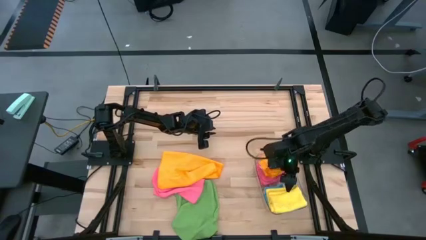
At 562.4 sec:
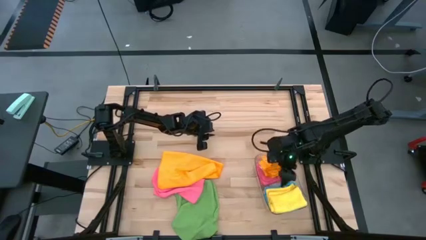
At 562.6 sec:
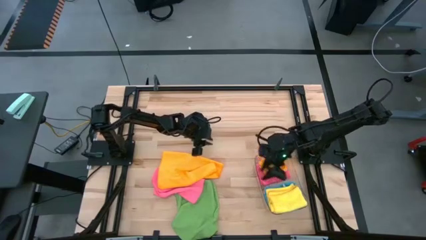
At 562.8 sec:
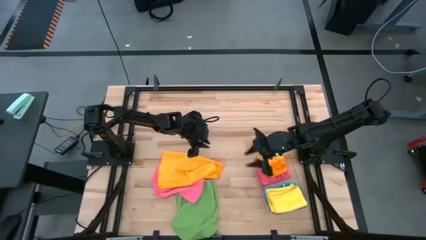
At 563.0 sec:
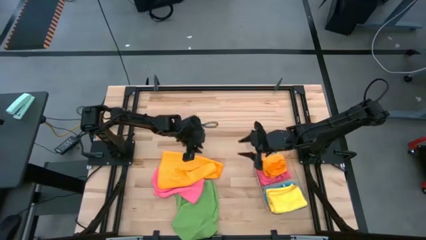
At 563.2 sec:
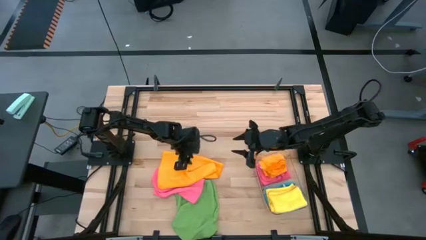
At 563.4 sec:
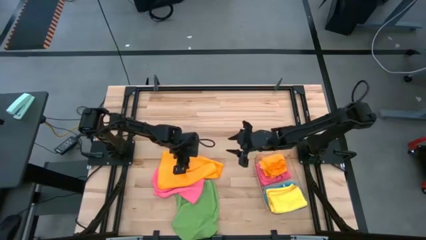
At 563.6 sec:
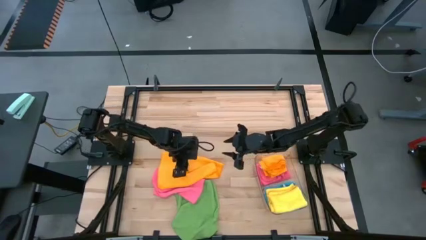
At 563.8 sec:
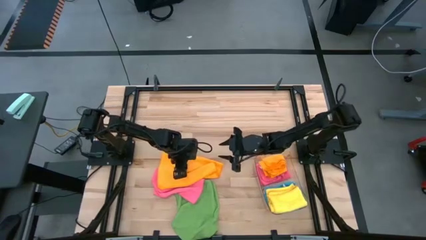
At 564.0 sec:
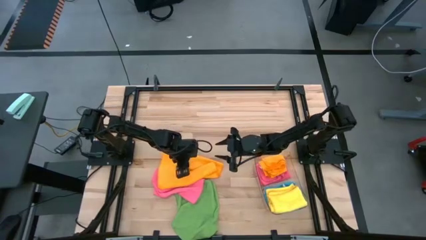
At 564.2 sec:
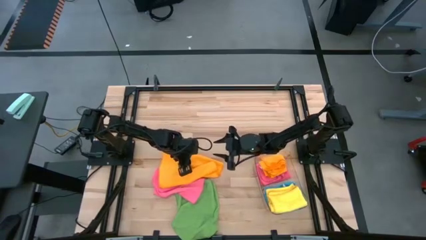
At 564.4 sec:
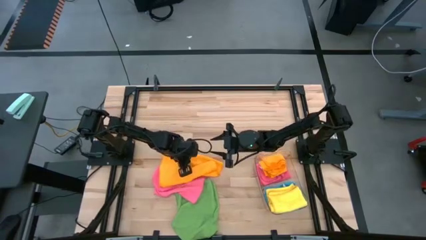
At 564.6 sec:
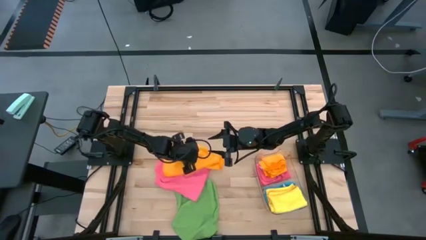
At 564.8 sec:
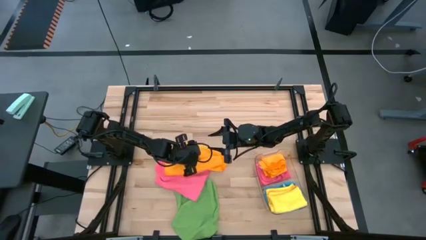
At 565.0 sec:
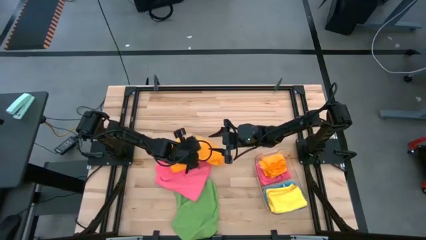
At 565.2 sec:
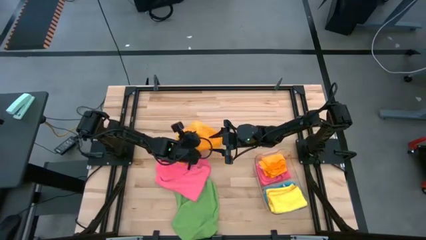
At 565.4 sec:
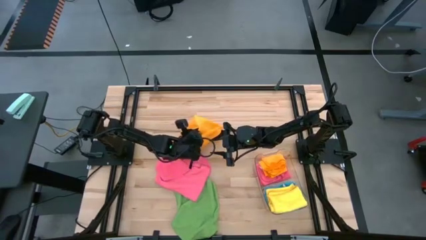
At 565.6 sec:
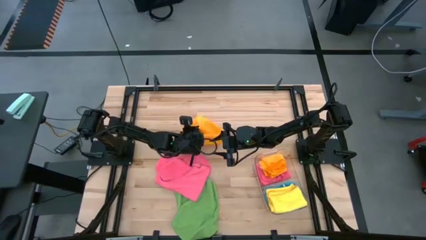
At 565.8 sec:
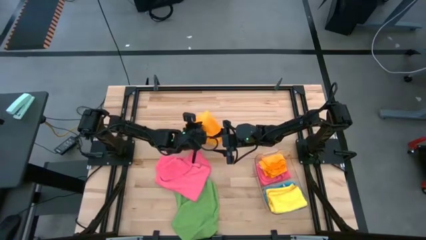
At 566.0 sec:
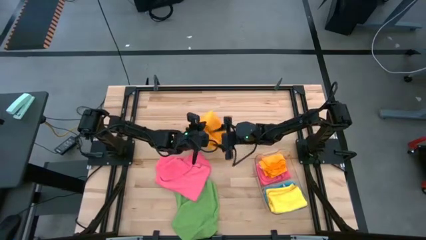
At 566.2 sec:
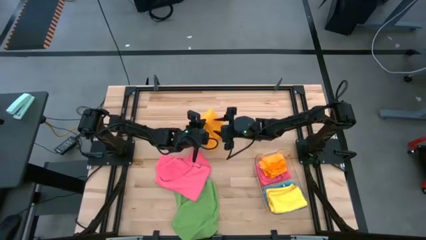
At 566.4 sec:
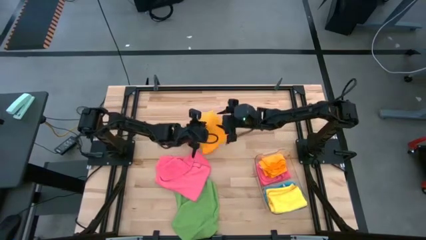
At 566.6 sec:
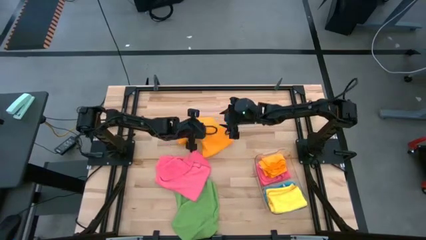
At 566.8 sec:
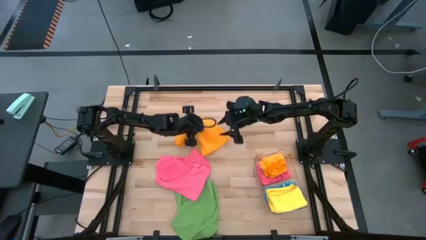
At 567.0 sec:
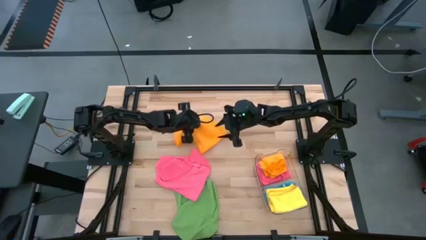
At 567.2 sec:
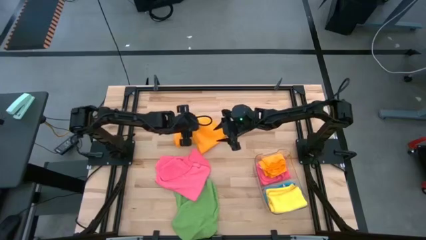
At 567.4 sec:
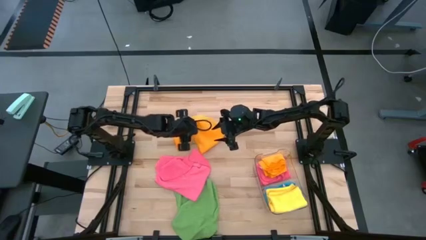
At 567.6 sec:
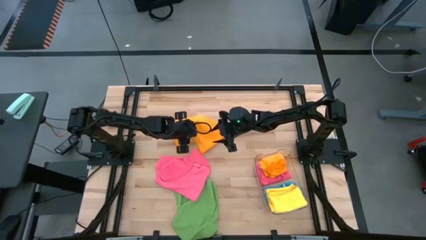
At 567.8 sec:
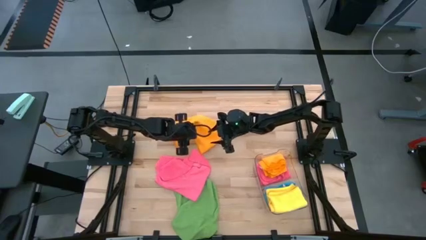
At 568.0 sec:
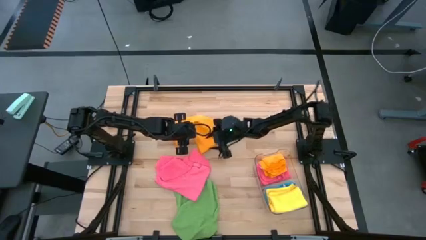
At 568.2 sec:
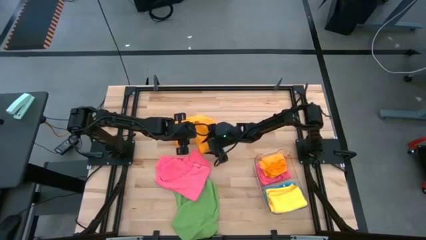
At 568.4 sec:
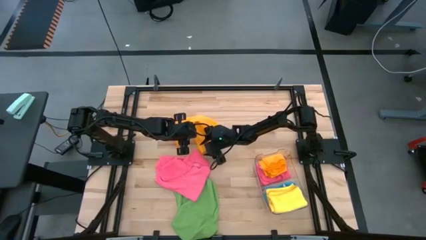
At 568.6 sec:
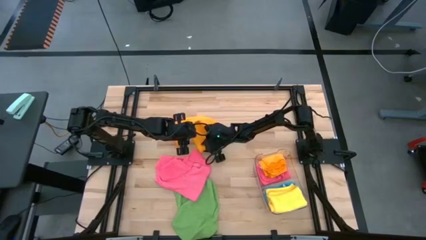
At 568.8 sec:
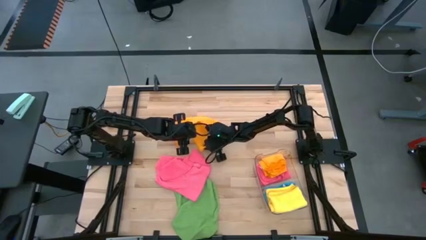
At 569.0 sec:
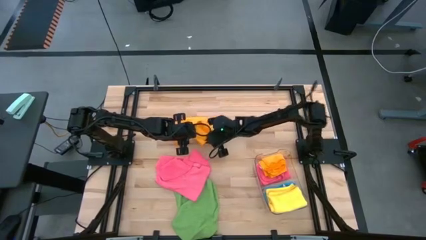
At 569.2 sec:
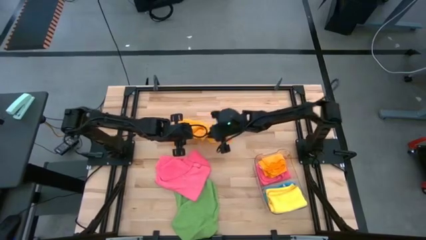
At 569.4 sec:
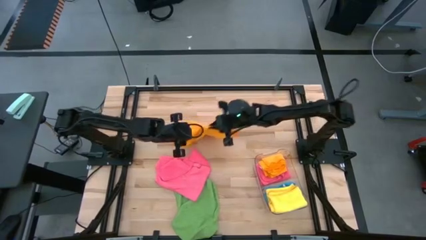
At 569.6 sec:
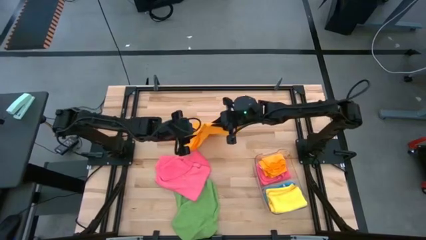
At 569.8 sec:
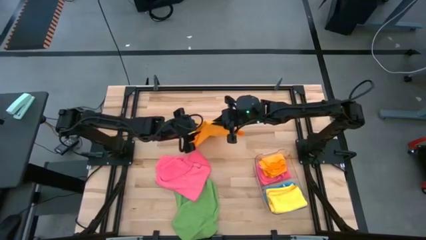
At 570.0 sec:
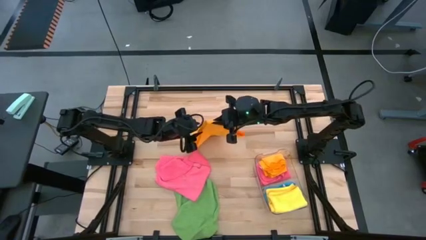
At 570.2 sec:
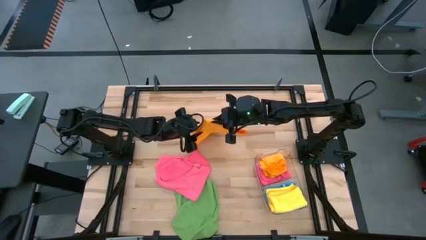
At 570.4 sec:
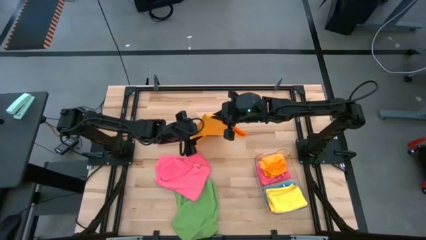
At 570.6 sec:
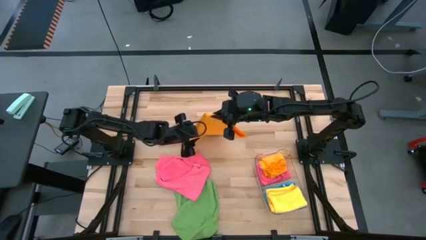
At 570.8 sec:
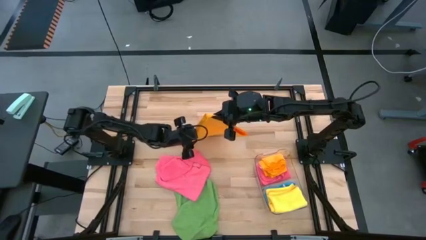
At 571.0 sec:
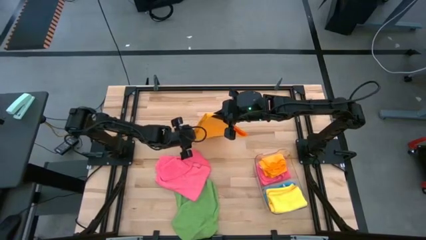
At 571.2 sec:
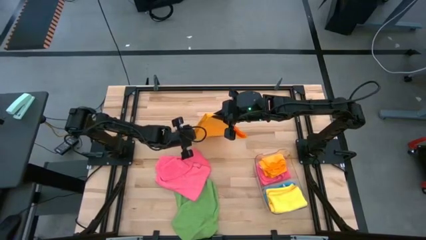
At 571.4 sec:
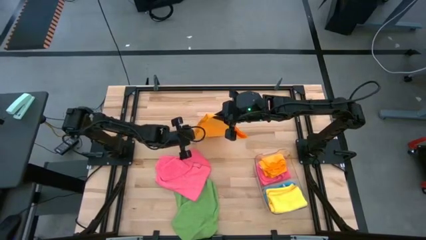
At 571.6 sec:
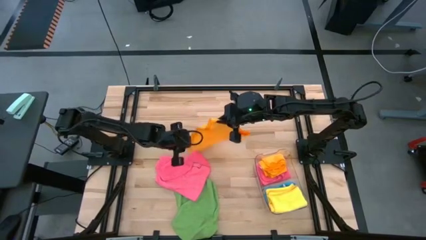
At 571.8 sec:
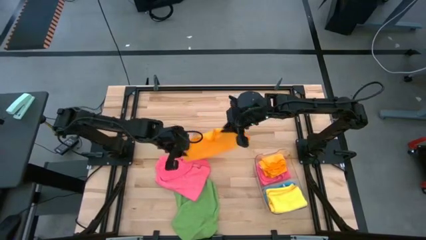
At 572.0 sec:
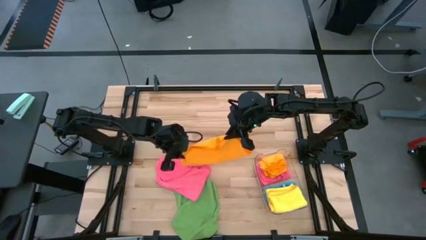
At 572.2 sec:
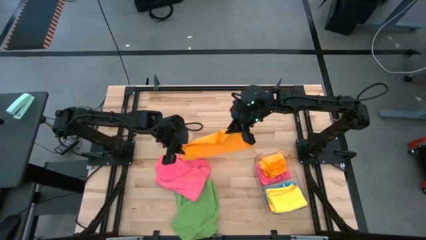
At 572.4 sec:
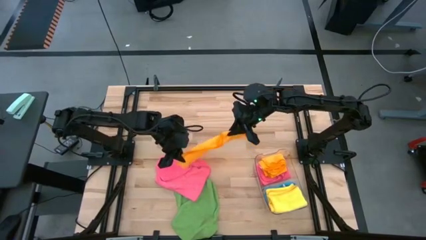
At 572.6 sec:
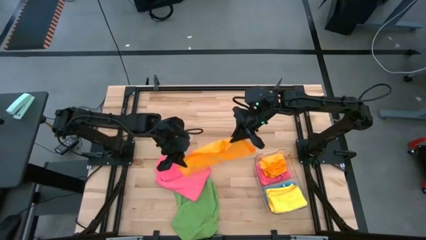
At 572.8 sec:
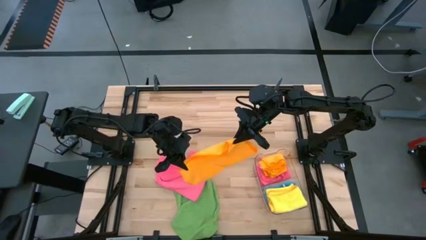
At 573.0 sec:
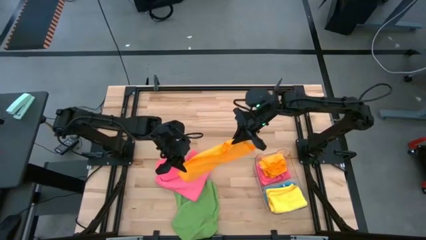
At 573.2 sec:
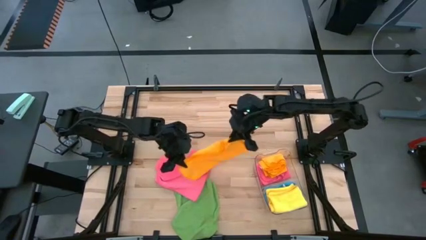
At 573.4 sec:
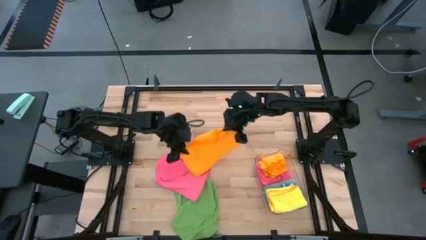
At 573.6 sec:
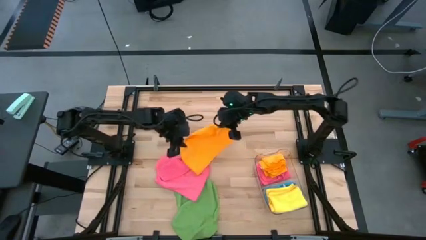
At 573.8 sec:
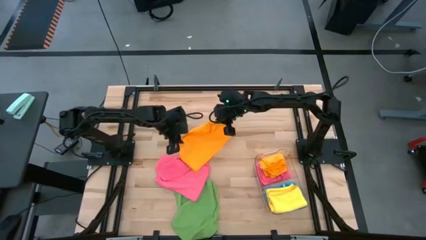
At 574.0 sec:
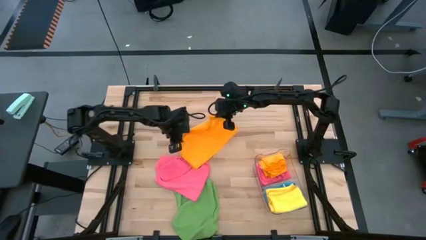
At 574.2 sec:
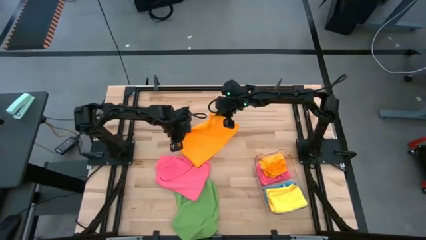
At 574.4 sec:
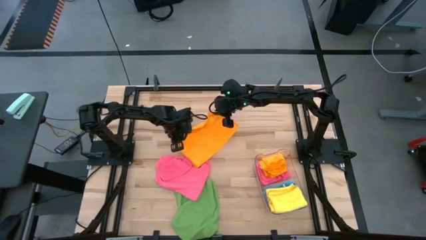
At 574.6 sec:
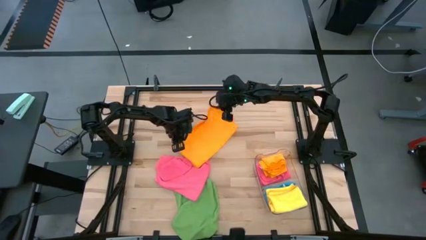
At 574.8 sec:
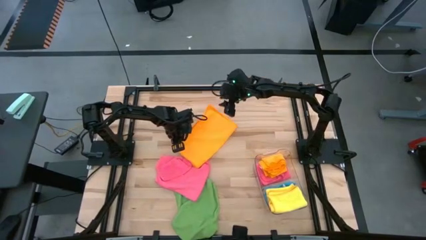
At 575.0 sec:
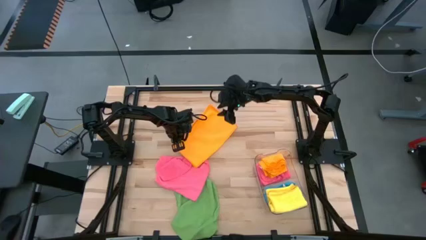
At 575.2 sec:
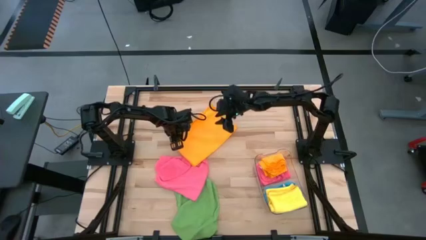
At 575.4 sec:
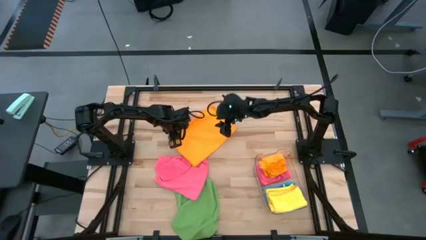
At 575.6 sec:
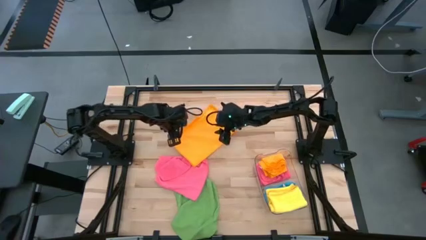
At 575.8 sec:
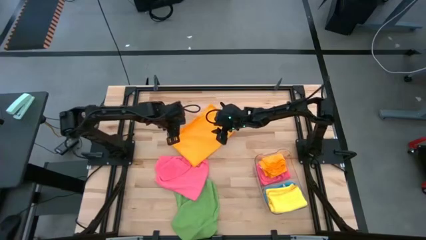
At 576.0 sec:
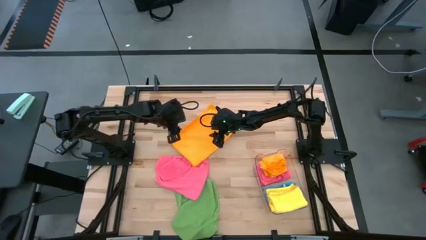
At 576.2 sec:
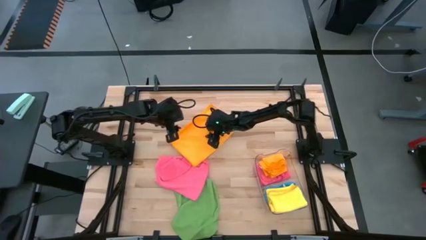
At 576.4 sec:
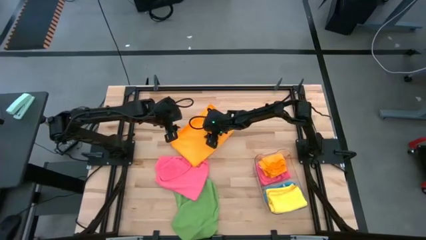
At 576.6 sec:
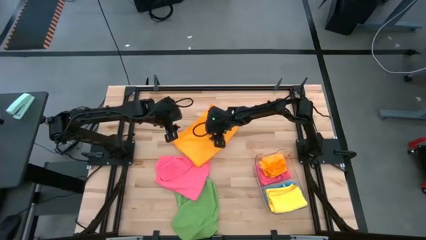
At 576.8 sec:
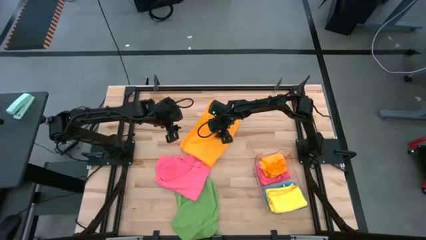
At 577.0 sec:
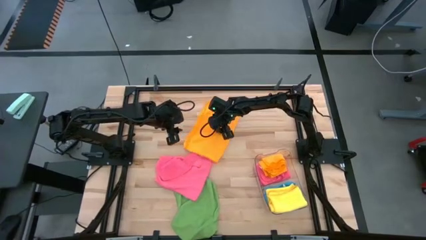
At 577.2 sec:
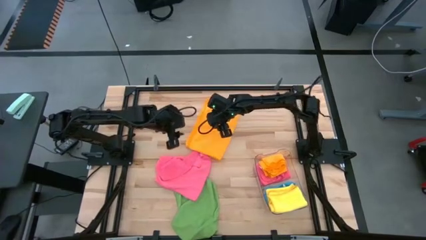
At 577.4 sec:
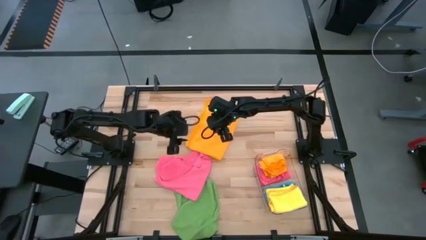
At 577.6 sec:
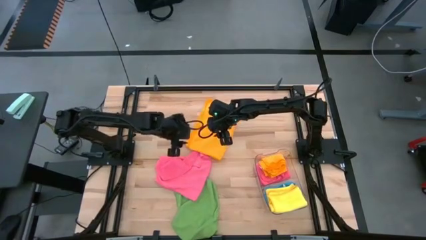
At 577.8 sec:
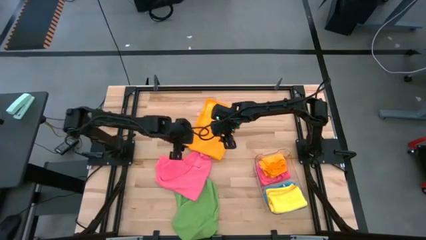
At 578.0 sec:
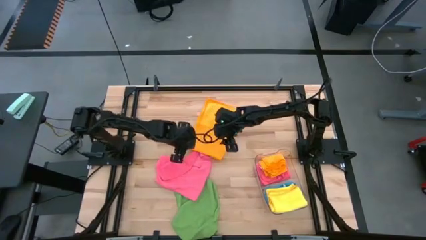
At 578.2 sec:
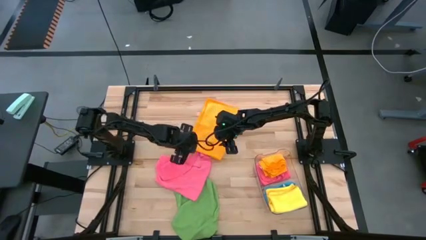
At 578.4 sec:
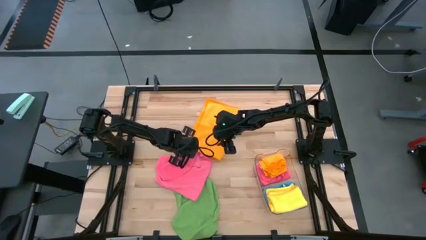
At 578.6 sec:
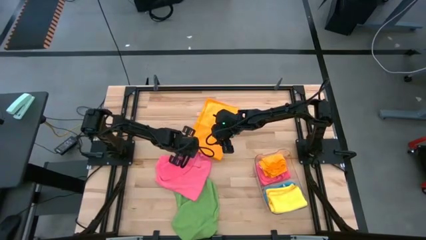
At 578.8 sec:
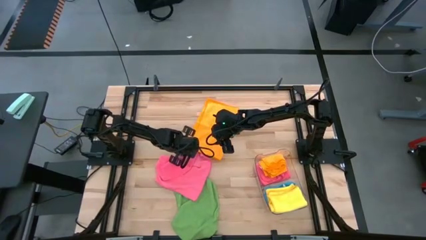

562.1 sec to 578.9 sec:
Task: Fold microfiber towels
Fold the orange towel
